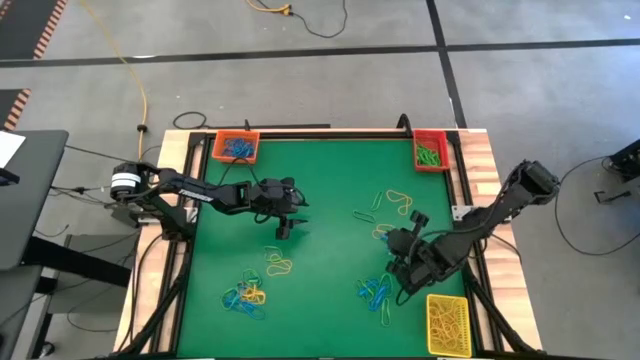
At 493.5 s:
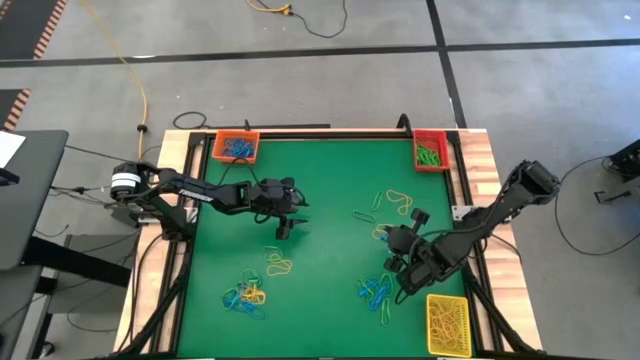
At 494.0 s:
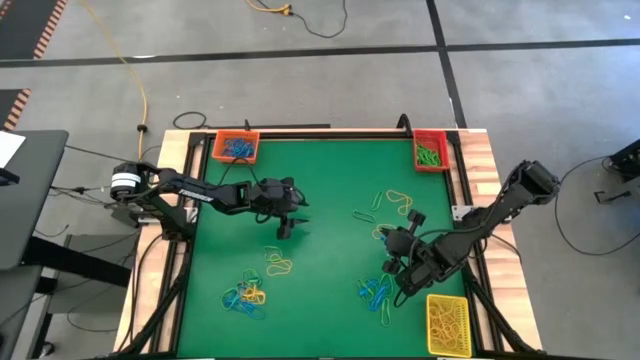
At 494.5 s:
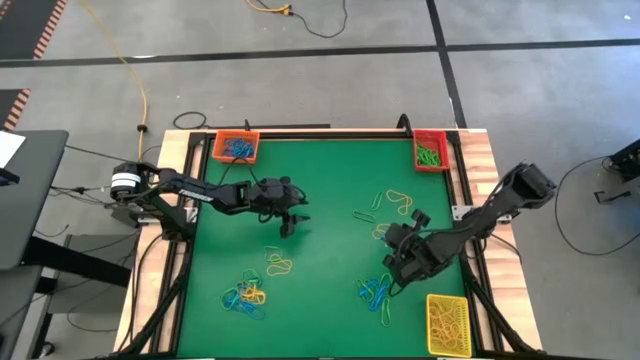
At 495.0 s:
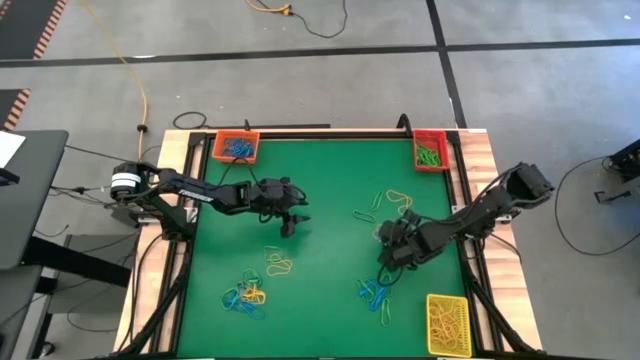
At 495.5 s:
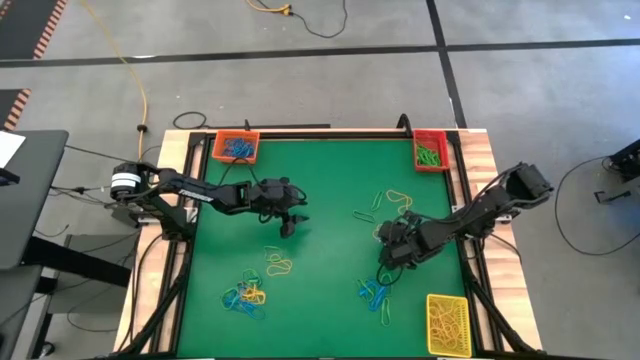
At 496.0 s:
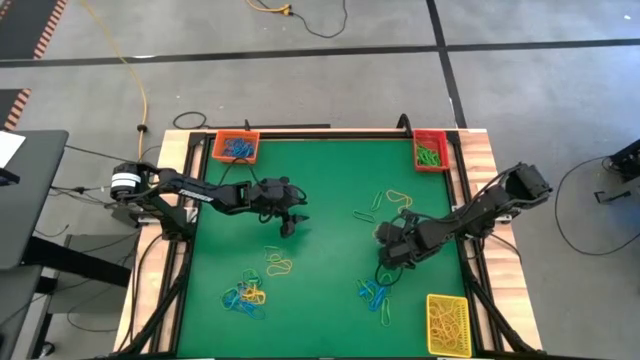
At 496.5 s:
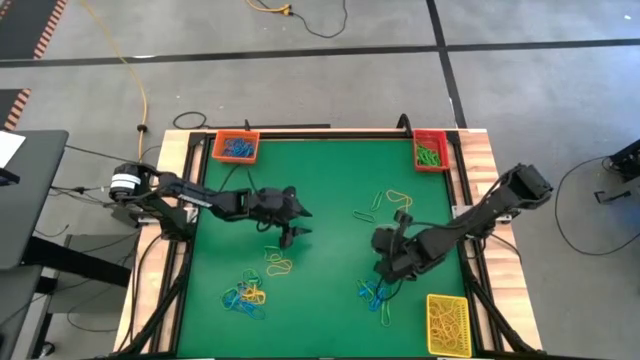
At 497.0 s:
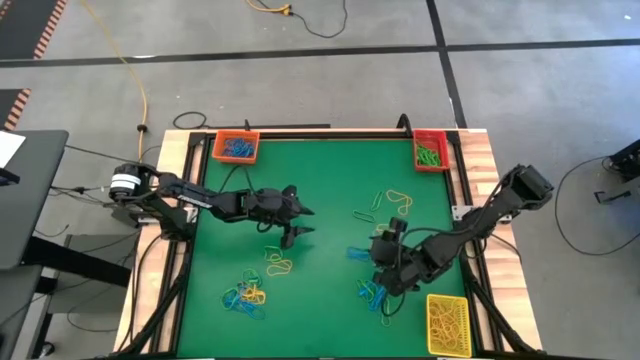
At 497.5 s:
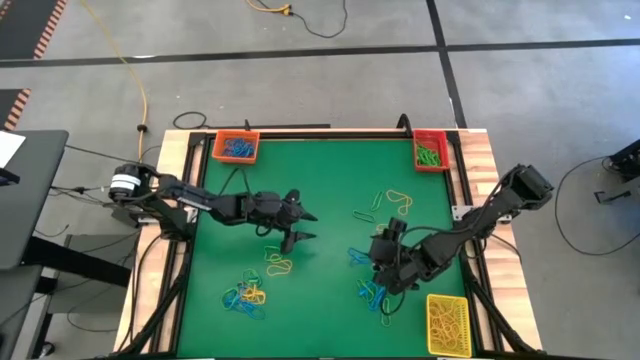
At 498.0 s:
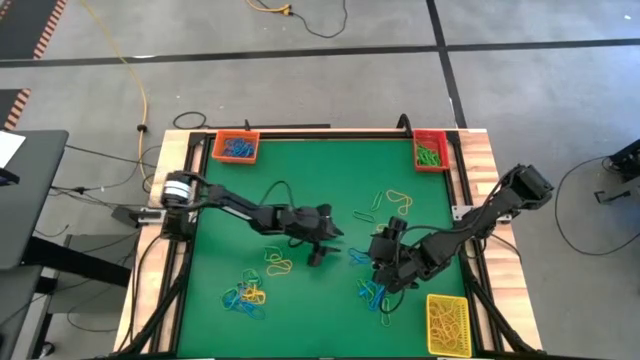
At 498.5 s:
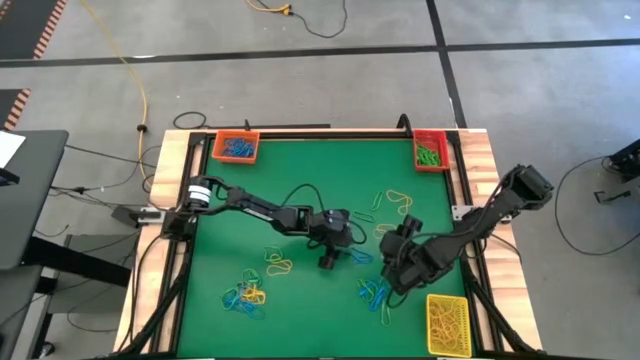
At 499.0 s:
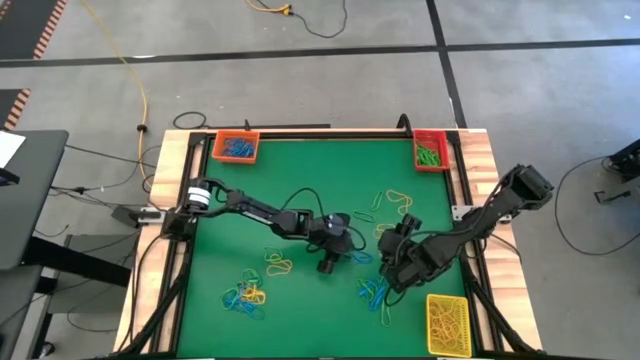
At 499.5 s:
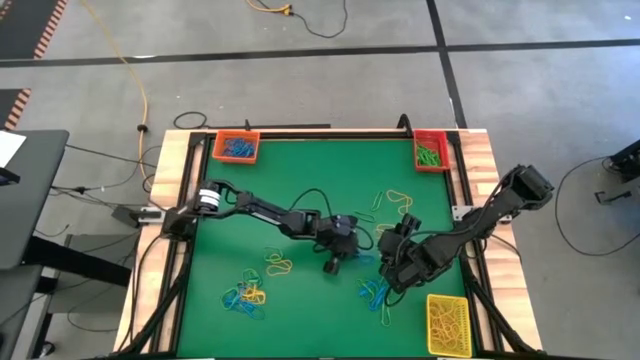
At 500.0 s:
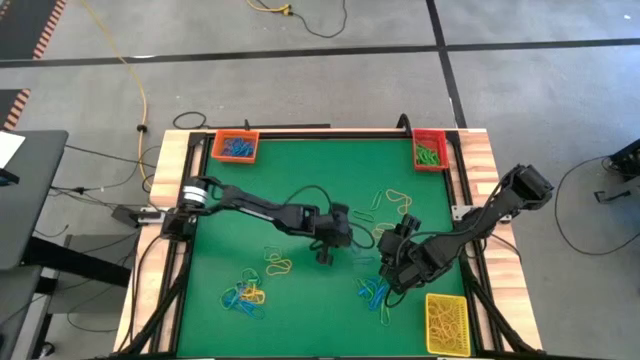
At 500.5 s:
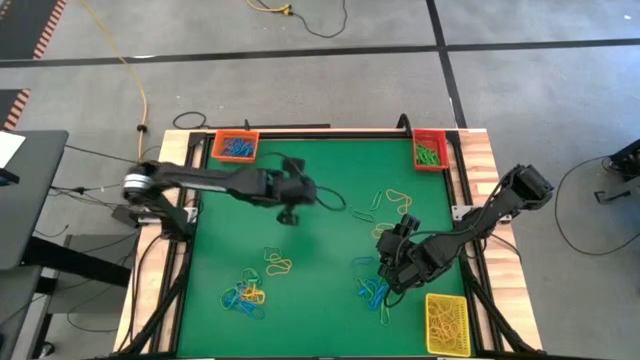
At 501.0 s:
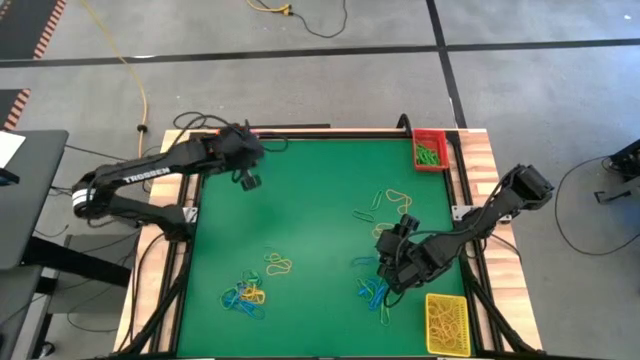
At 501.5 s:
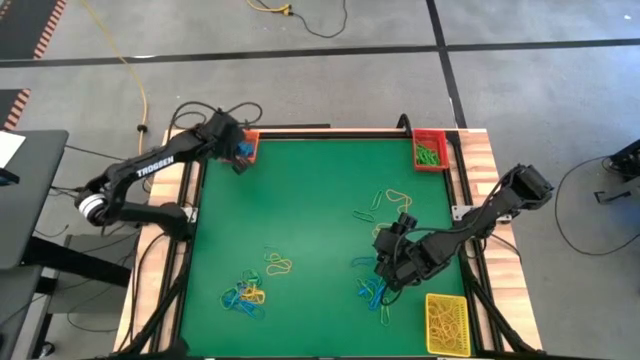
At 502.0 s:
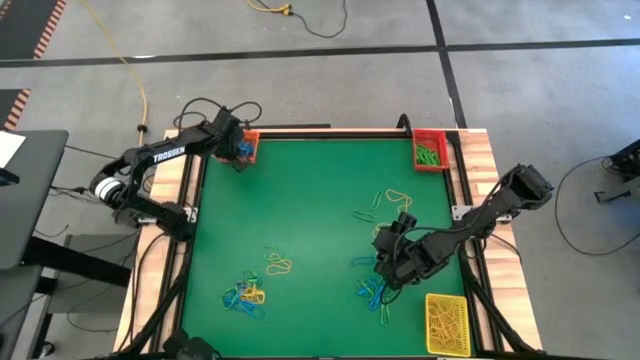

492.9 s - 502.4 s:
Task: Sort rubber bands into baskets
Put the top right blue rubber band into the orange bin

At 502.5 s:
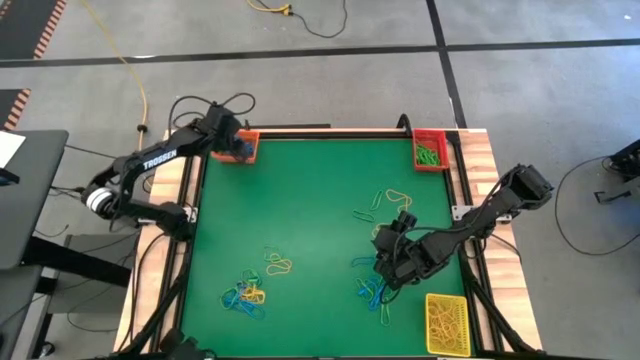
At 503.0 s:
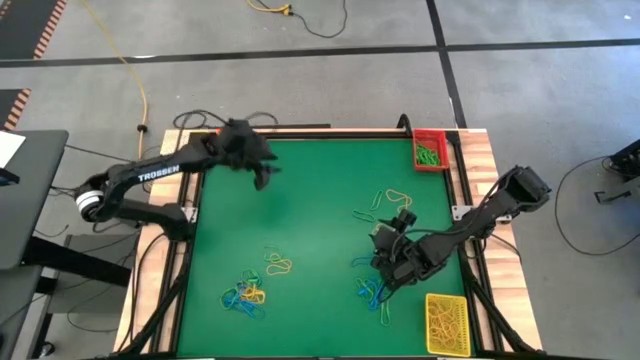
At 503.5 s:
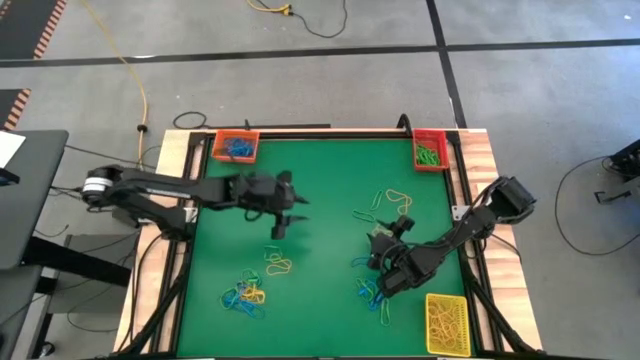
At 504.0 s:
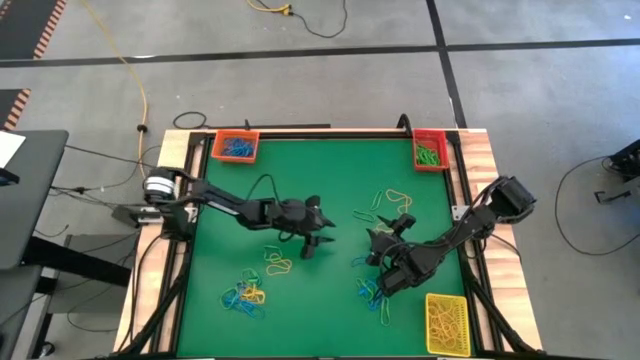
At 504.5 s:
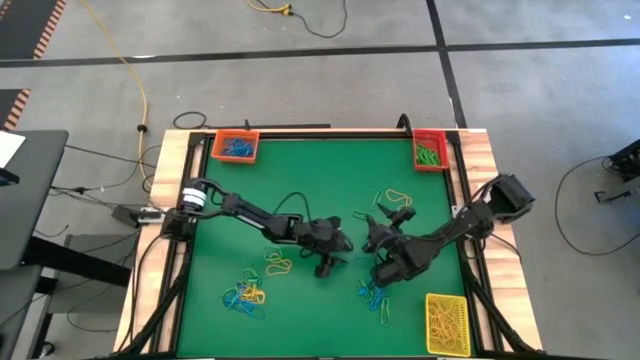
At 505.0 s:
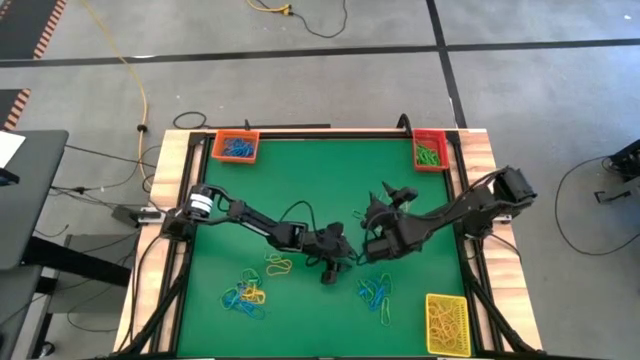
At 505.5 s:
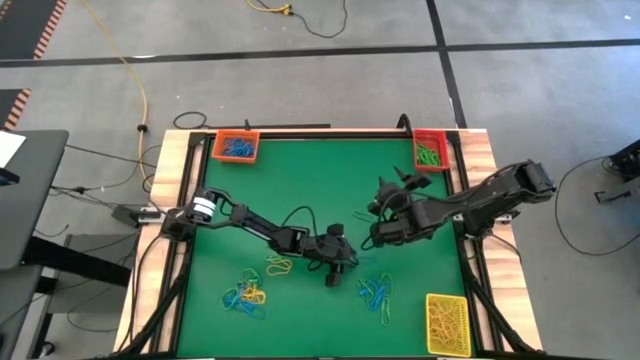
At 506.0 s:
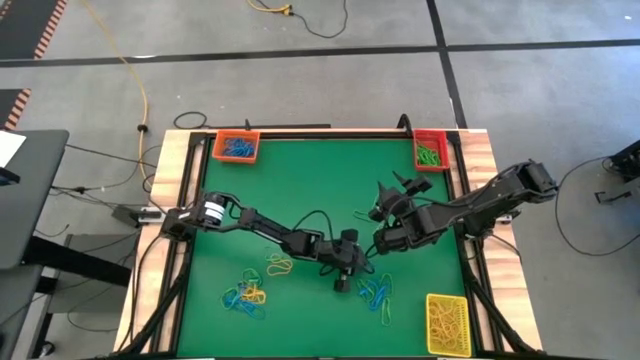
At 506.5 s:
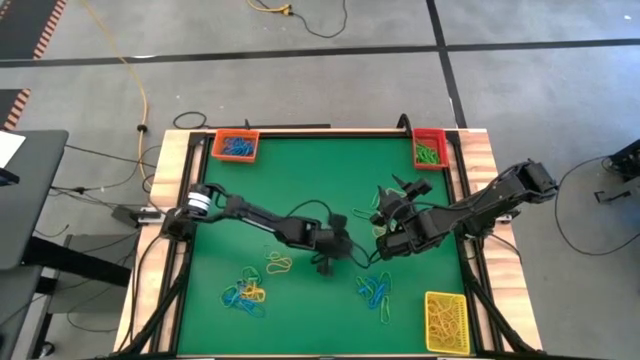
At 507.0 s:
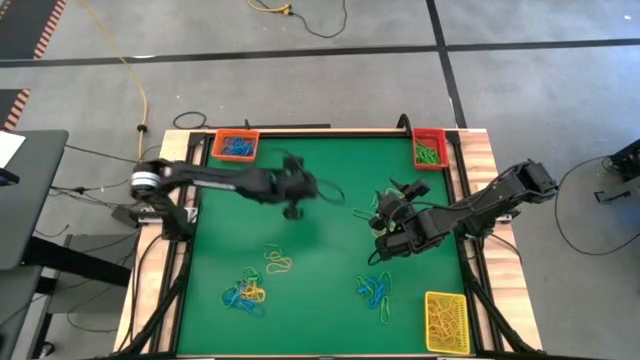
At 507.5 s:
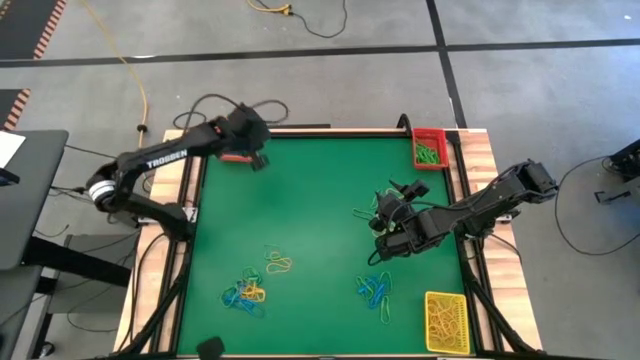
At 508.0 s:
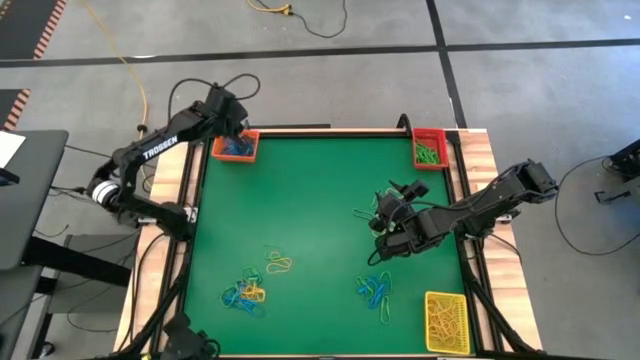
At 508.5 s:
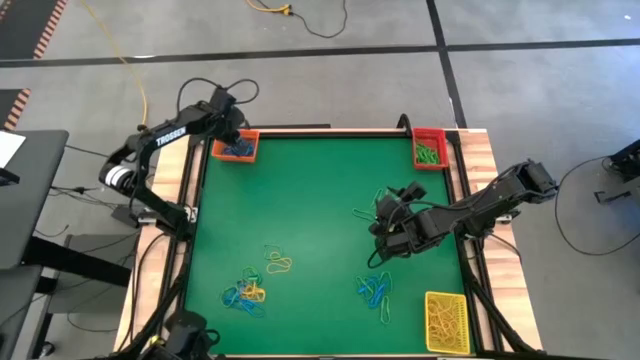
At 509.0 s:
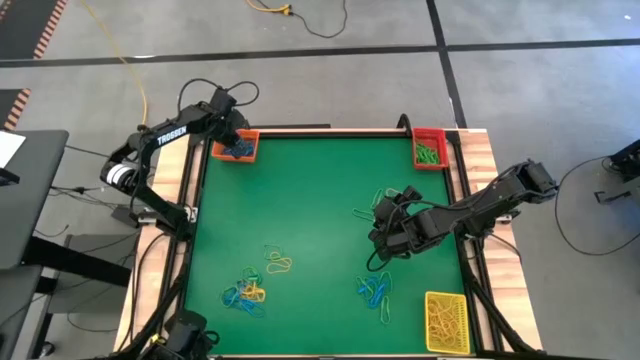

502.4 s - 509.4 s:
Put the top right blue rubber band into the orange bin

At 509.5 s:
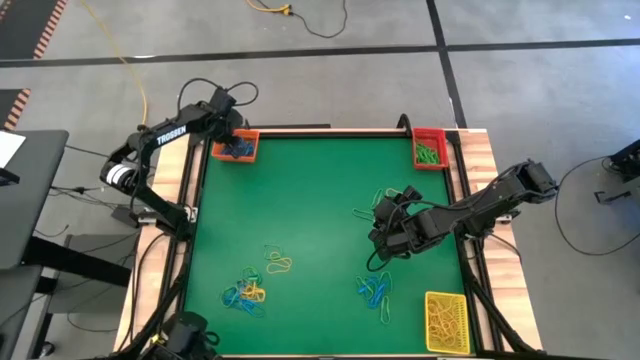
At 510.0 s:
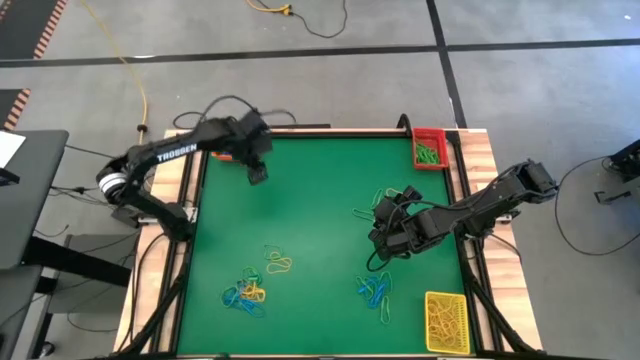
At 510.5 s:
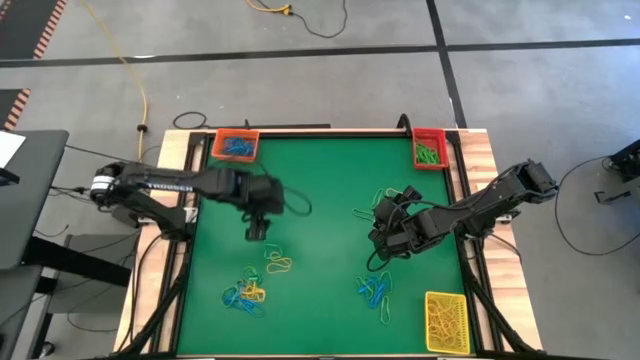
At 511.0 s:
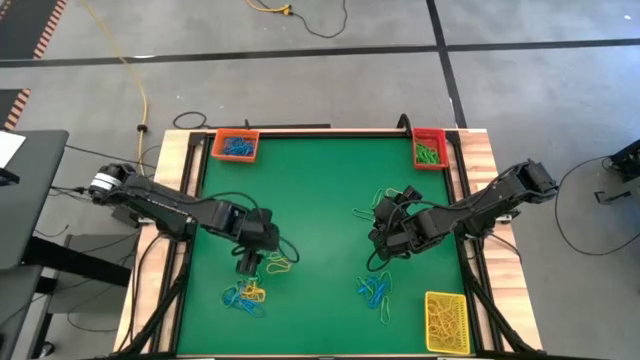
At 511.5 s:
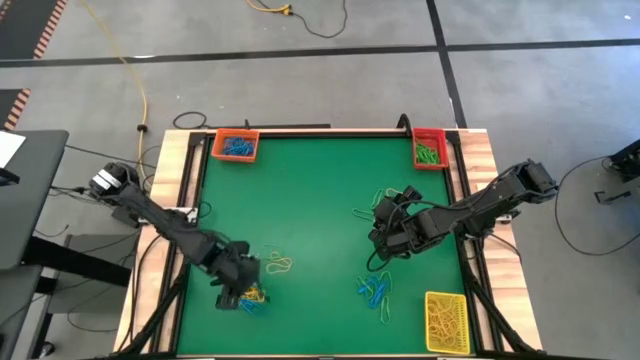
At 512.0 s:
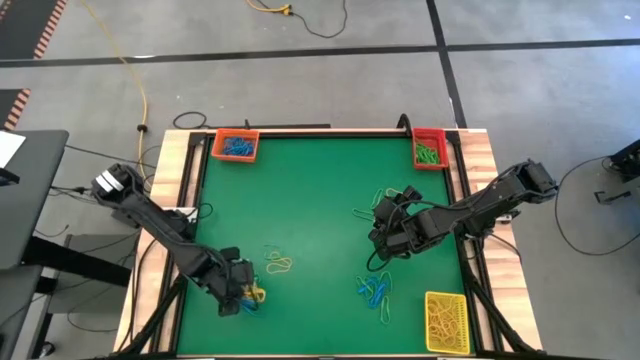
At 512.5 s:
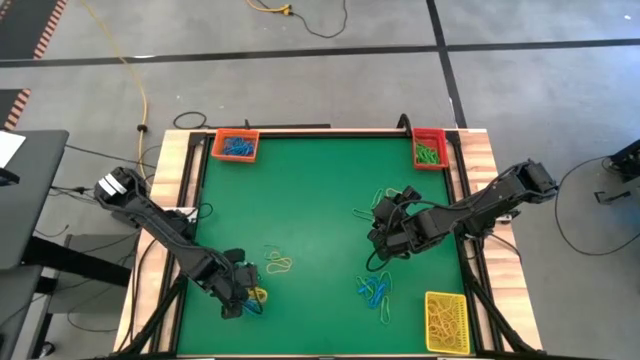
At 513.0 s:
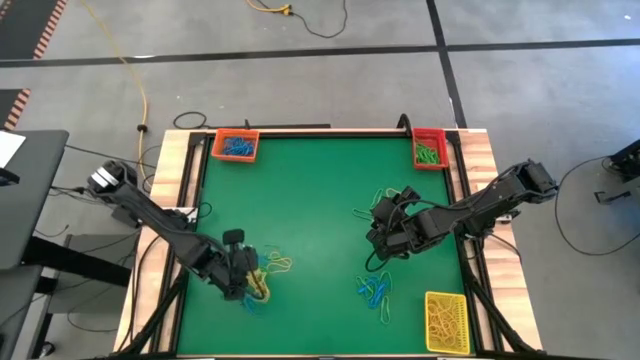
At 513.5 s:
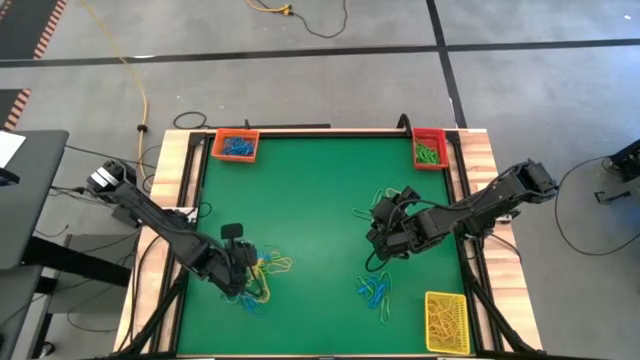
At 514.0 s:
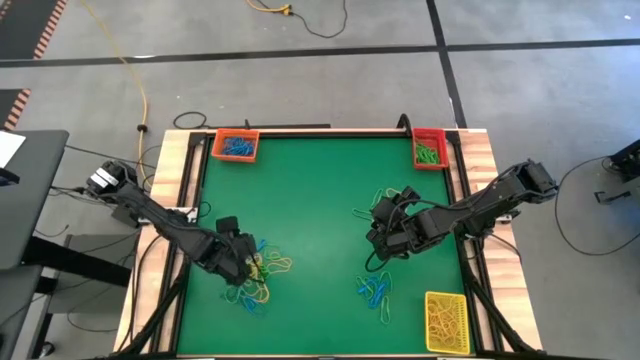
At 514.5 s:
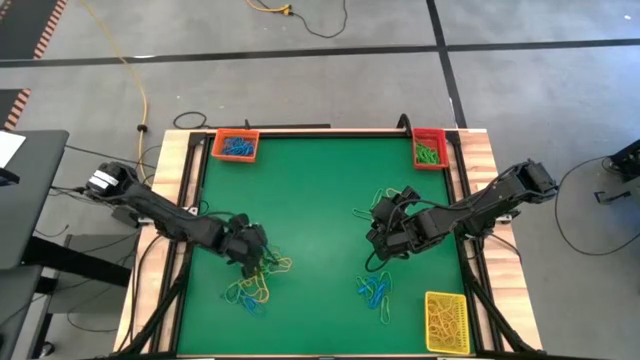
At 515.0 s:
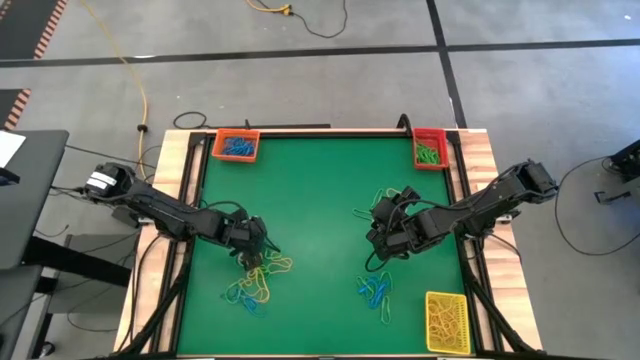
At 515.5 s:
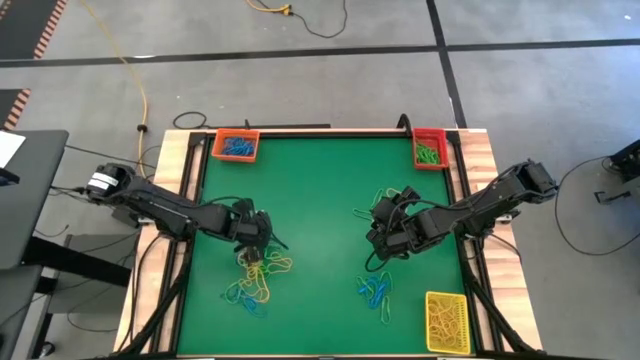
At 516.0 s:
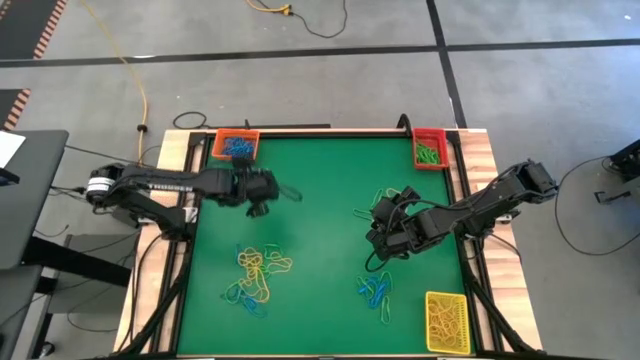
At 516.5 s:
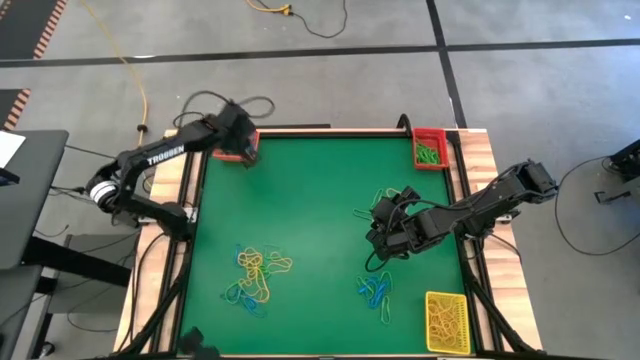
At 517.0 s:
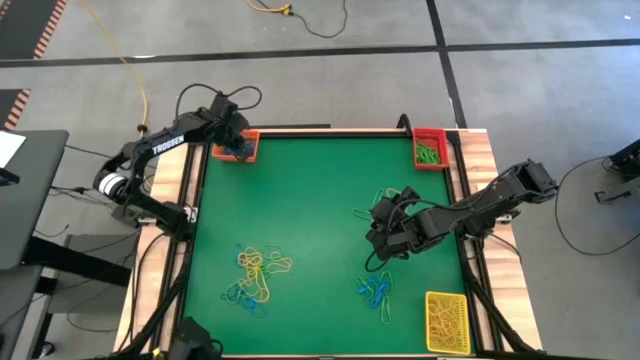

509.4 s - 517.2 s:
Put the bottom left blue rubber band into the orange bin
